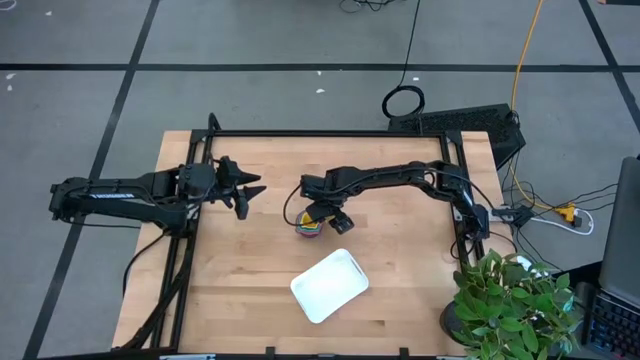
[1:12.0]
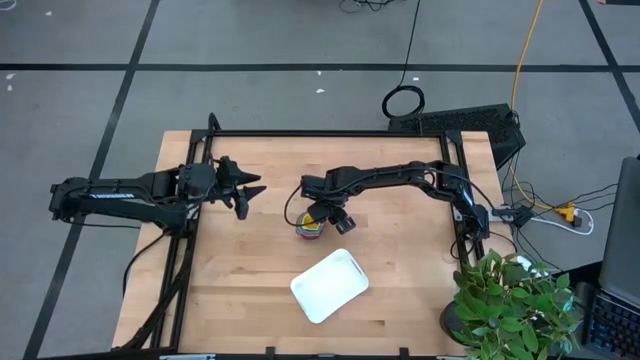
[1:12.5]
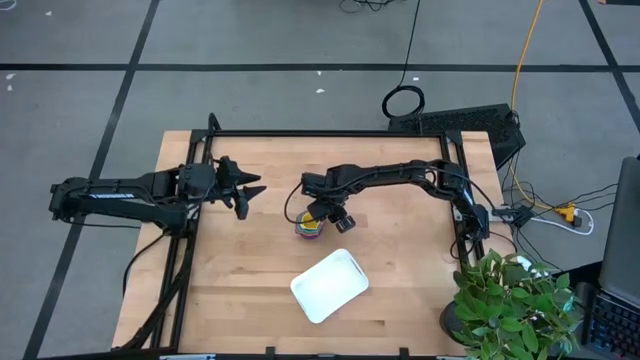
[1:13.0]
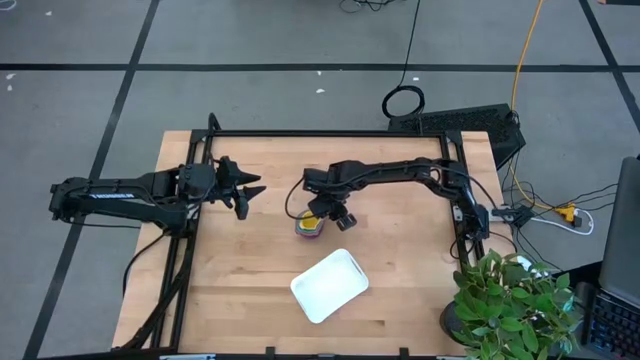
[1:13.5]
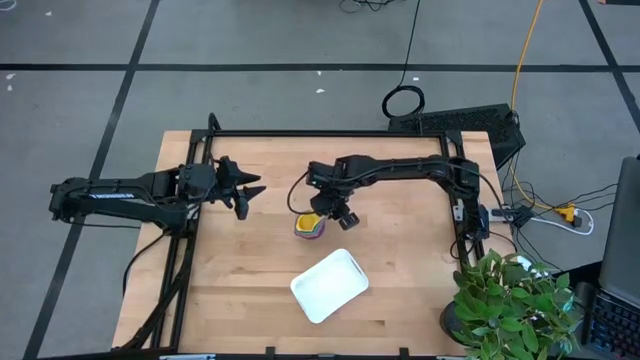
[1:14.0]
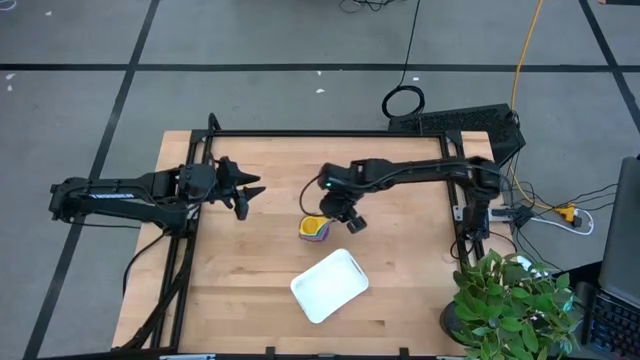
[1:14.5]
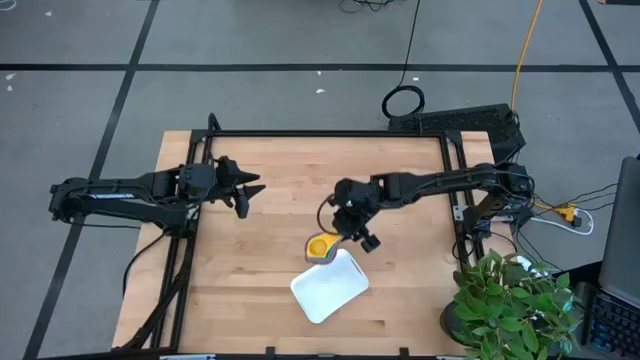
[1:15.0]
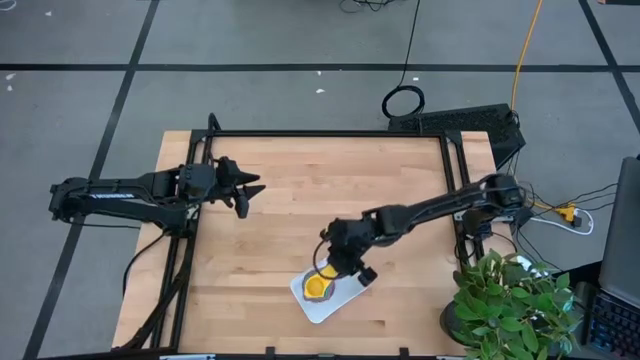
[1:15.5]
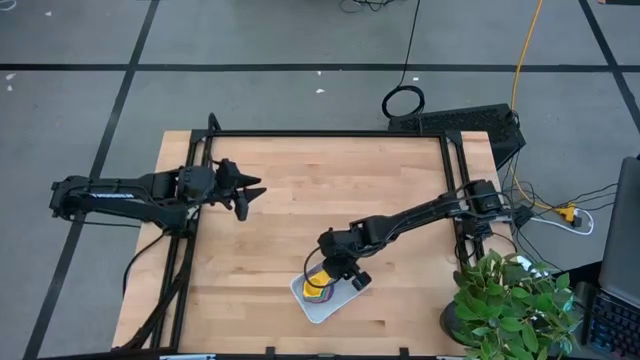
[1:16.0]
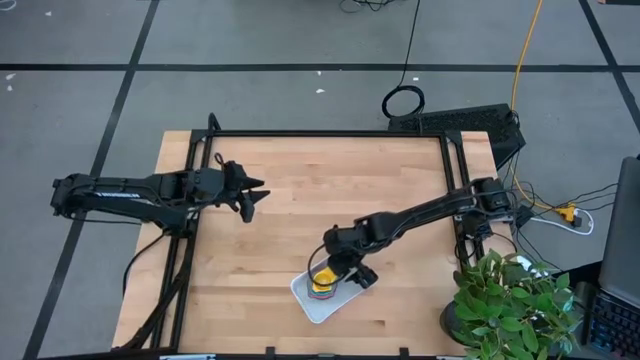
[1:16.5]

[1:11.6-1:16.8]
Task: Nest measuring cups in basket
Put the nested measuring cups into the white bin

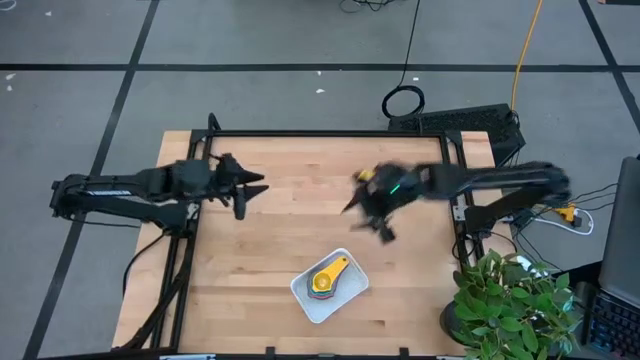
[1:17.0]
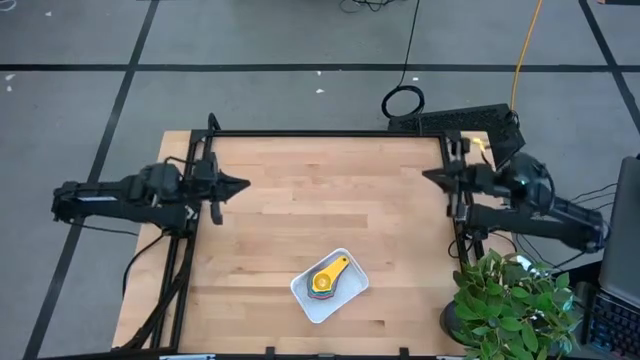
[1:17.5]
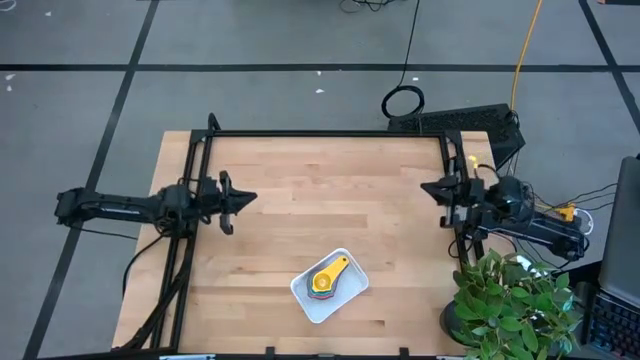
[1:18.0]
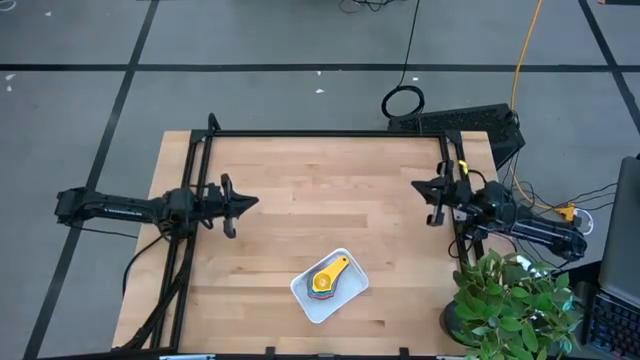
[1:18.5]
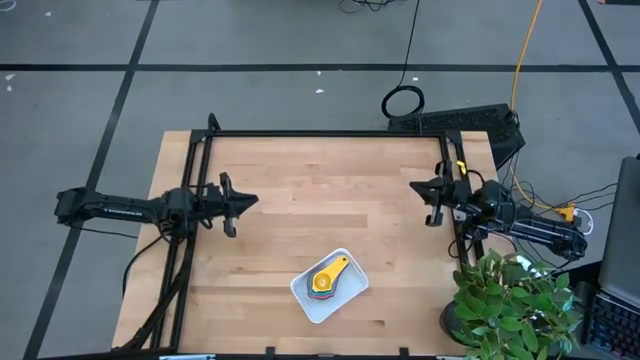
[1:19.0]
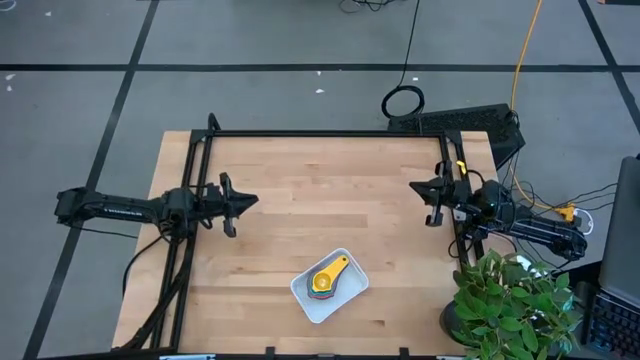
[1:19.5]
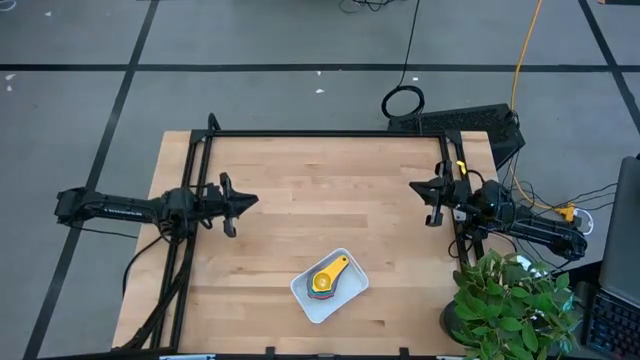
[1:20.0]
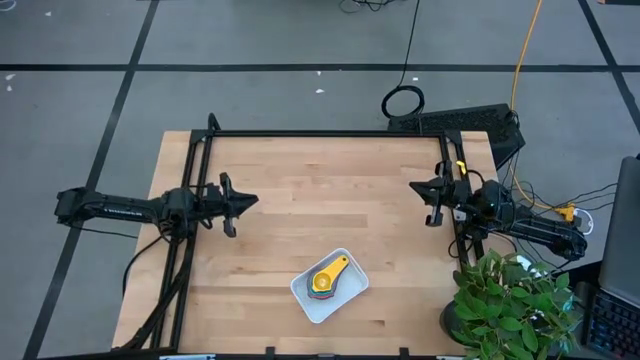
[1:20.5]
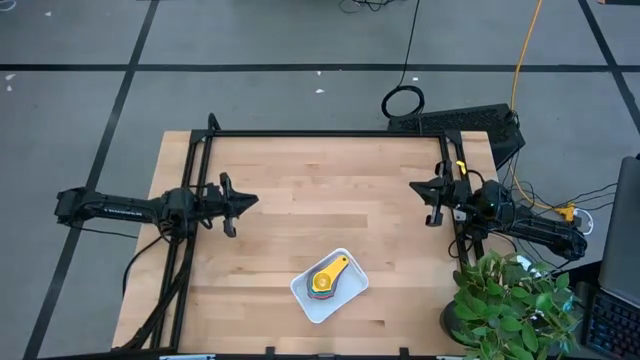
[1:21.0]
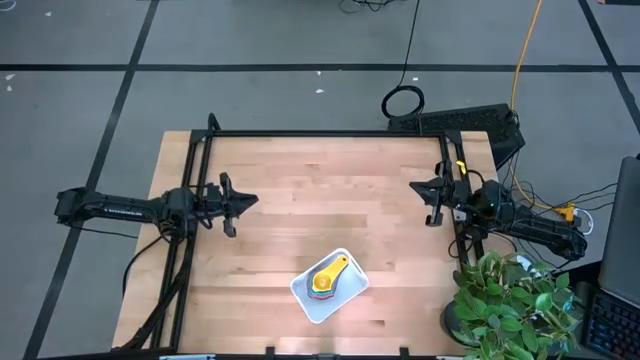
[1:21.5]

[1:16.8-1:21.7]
Return to Home Position

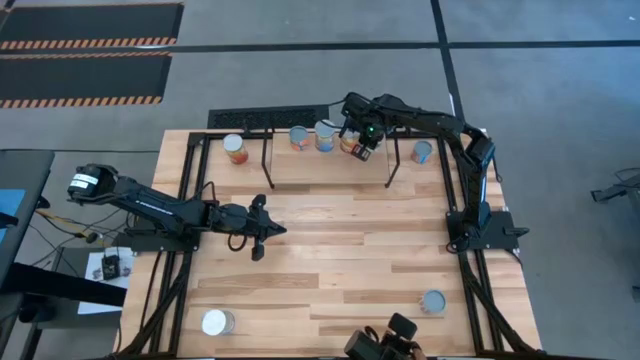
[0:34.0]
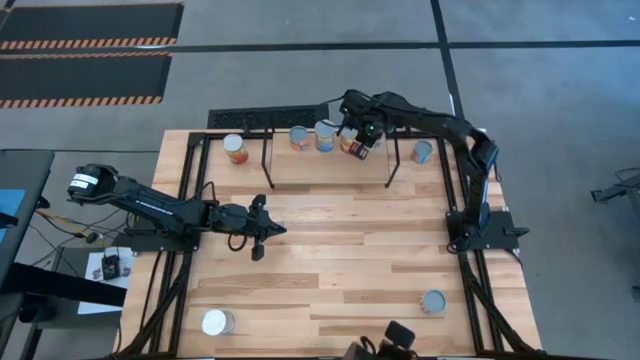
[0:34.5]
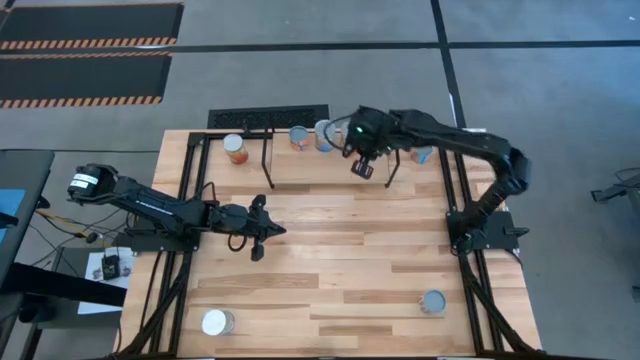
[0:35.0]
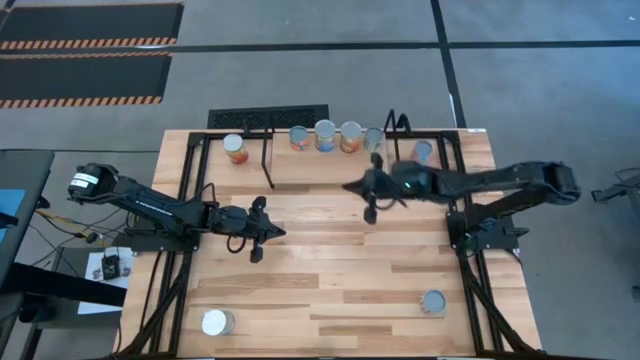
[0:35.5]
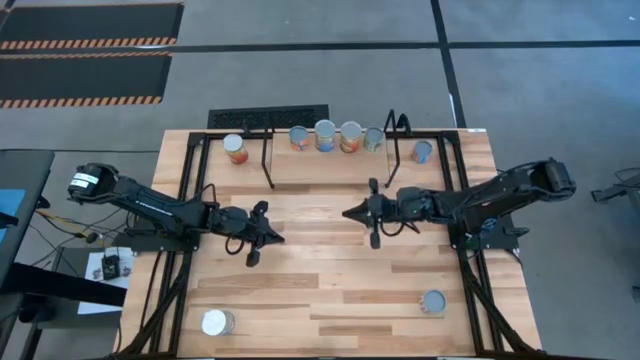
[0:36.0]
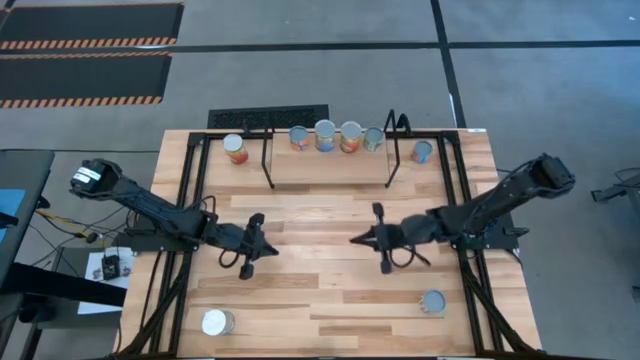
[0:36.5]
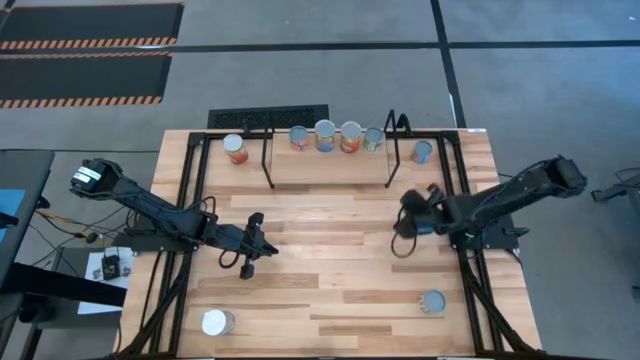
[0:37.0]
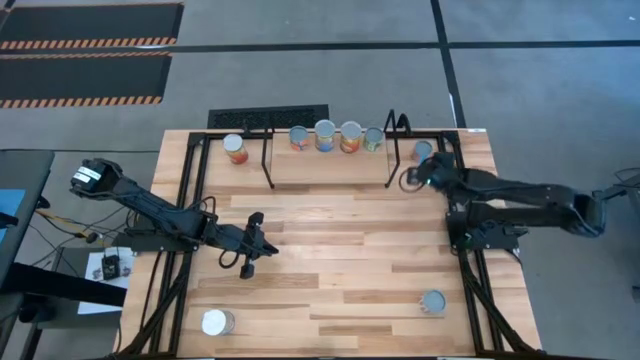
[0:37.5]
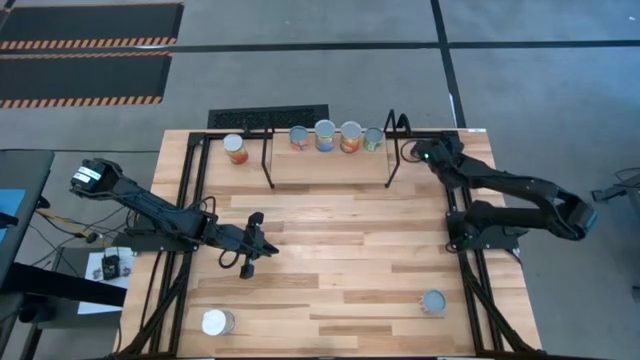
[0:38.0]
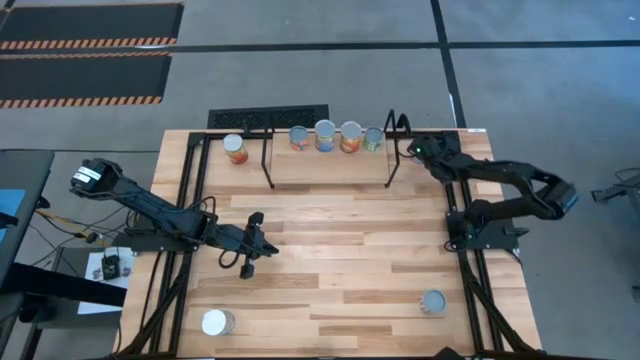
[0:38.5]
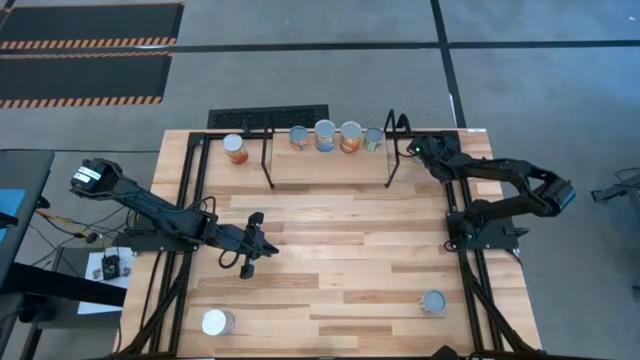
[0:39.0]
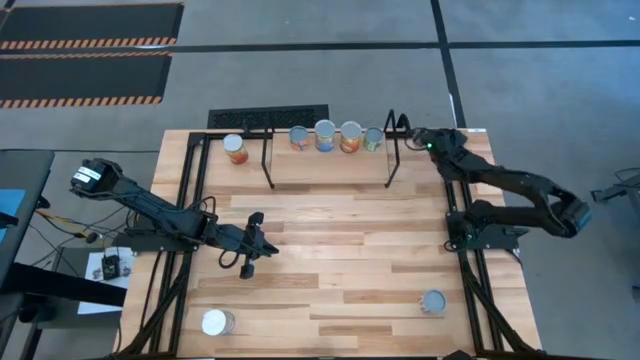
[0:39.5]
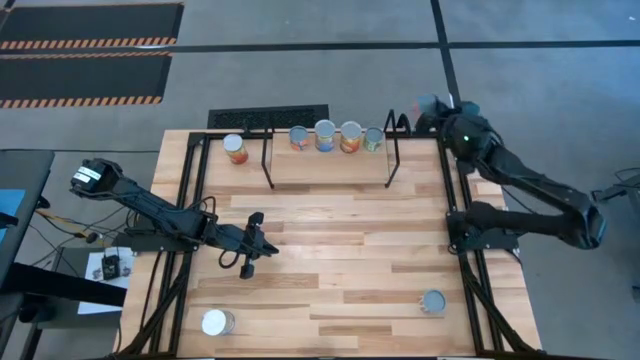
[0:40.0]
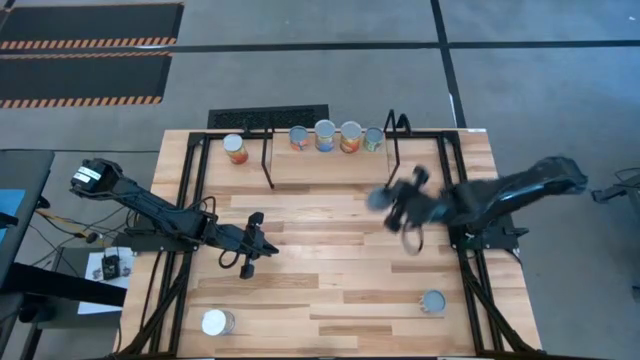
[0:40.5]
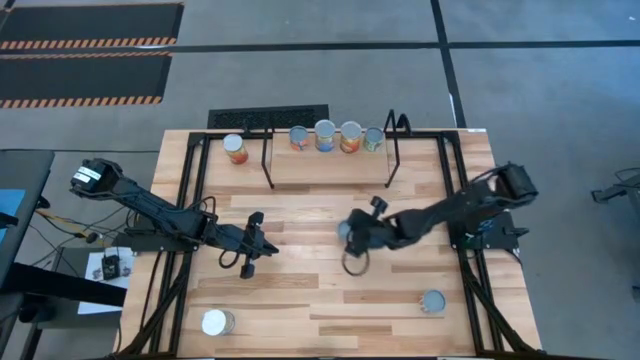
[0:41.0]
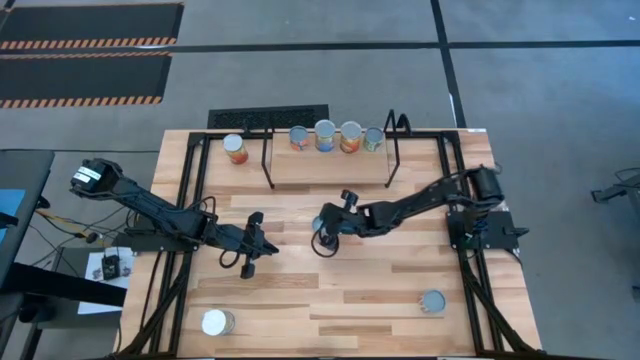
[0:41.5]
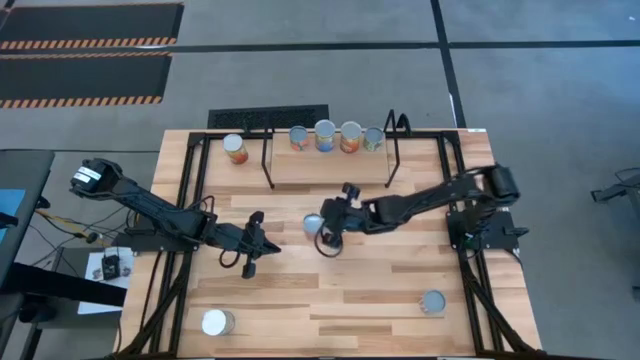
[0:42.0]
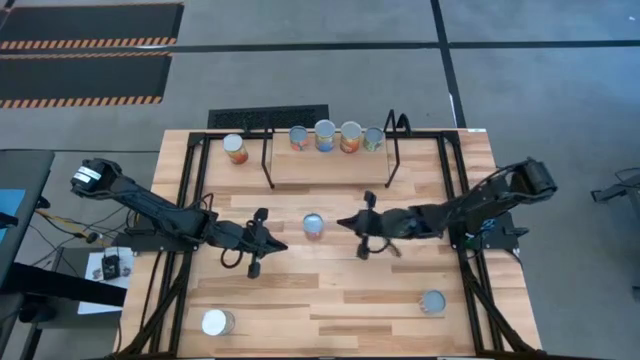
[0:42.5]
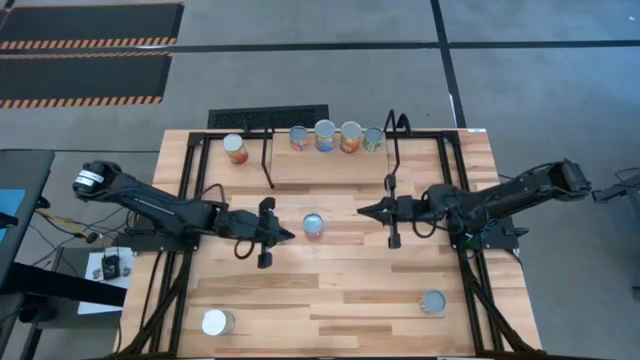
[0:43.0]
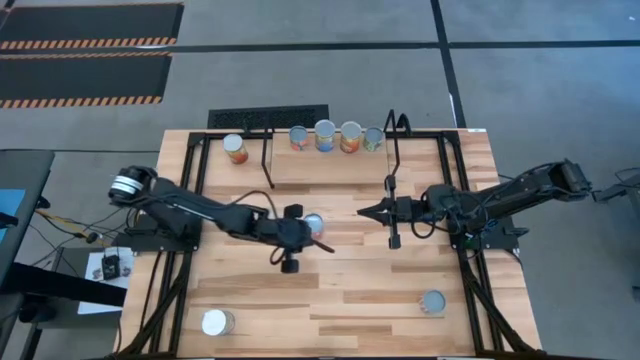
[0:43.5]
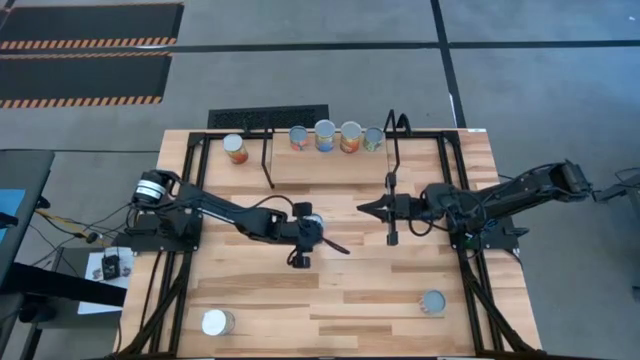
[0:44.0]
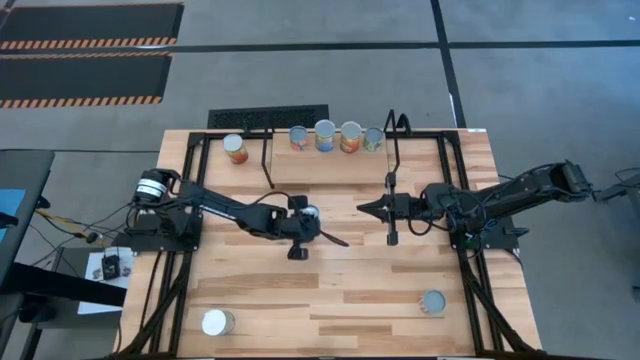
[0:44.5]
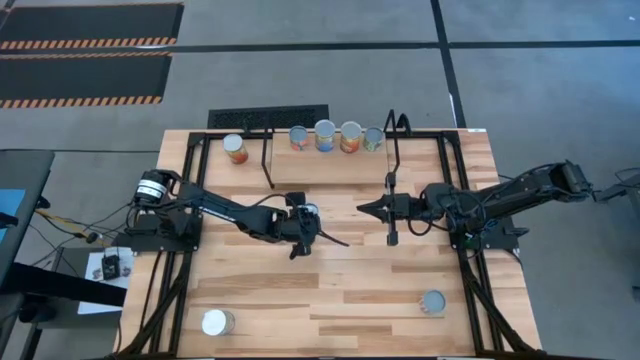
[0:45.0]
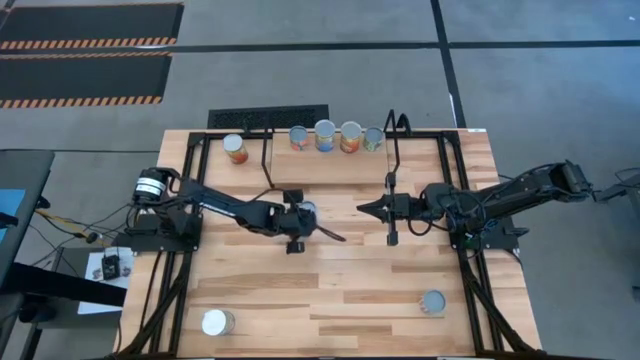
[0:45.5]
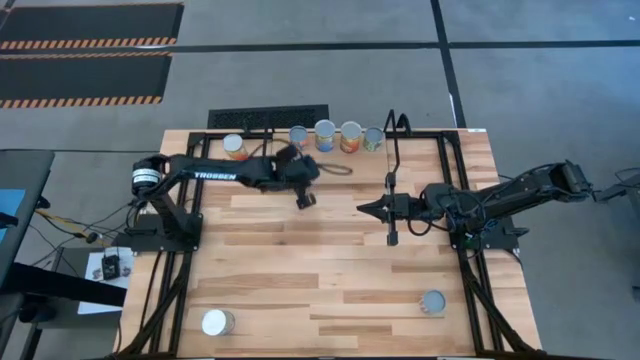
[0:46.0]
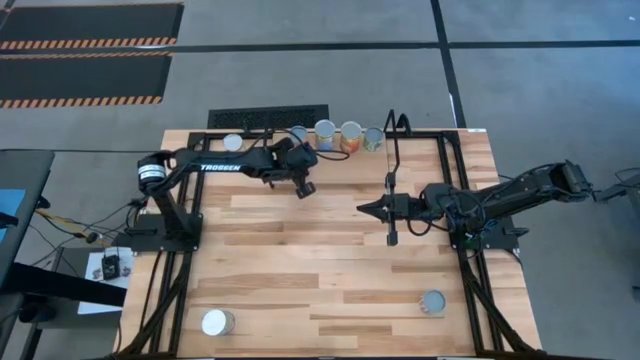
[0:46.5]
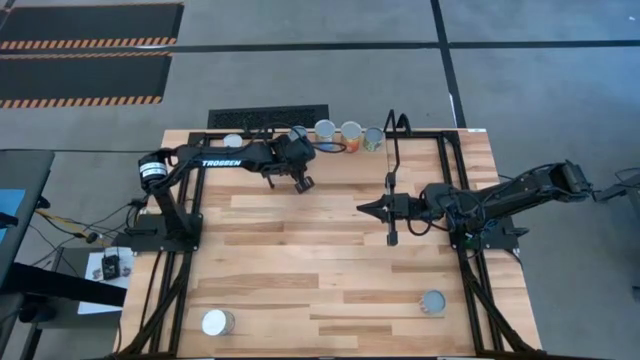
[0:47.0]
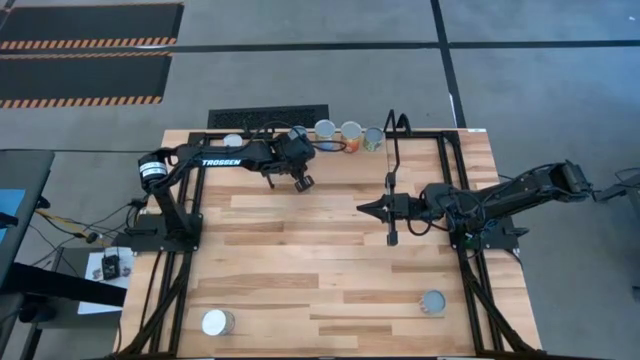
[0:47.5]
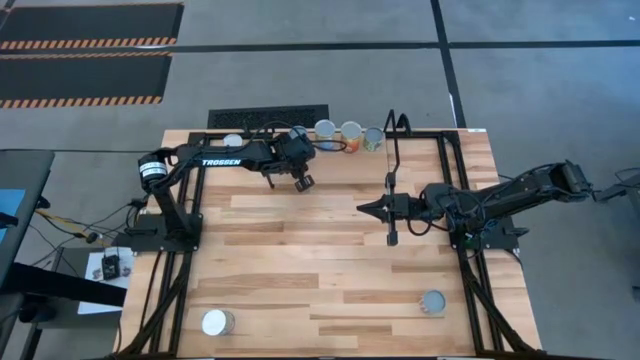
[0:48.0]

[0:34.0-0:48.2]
Task: Pick and place cans onto a shelf
Put the right canned corn on the shelf aligned with the canned oranges
